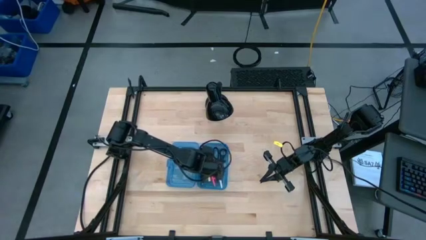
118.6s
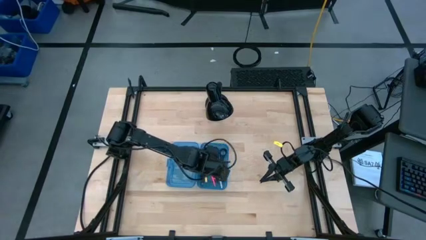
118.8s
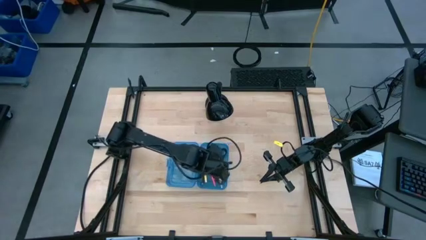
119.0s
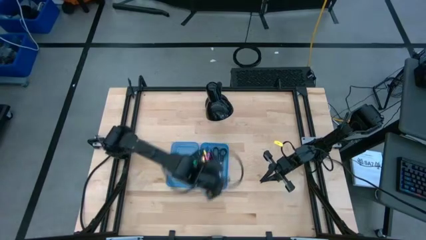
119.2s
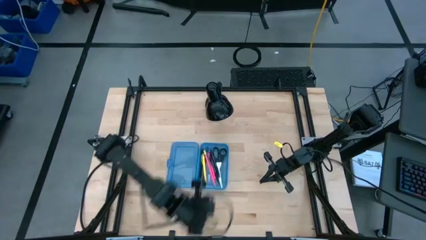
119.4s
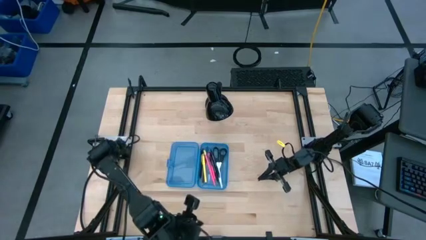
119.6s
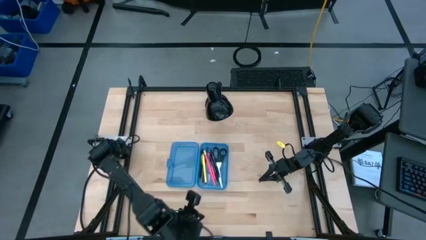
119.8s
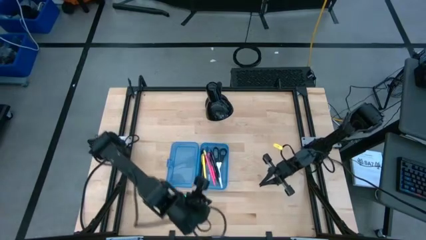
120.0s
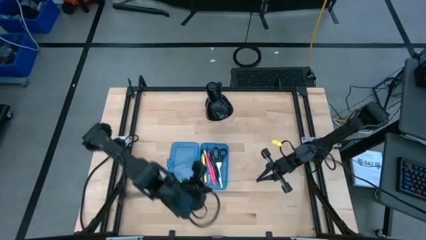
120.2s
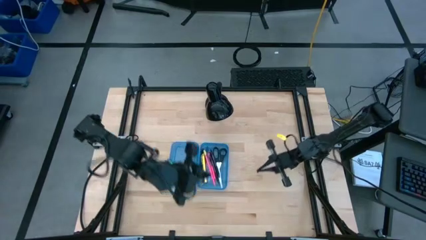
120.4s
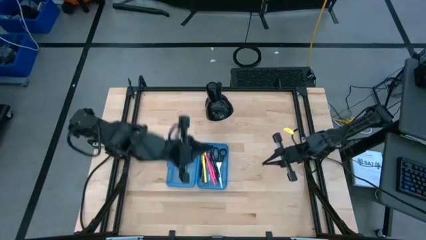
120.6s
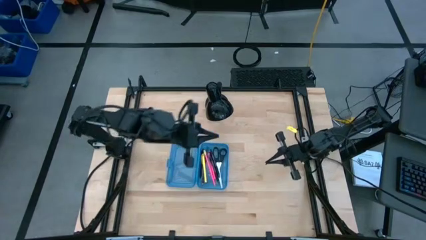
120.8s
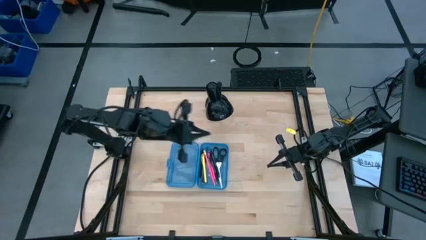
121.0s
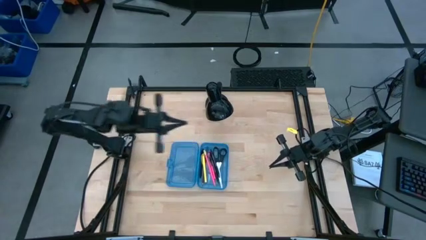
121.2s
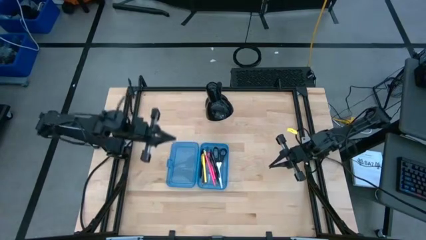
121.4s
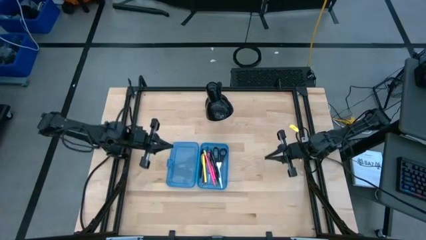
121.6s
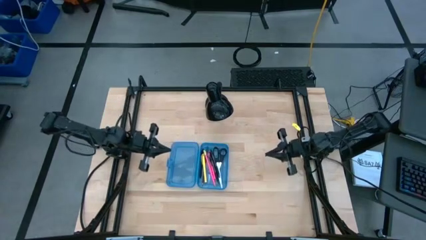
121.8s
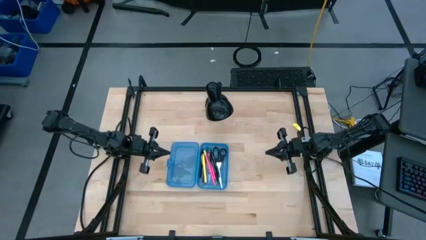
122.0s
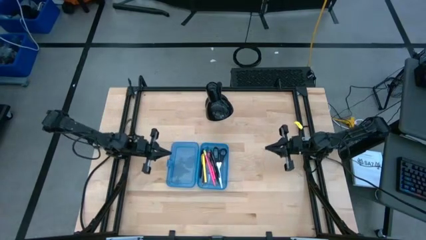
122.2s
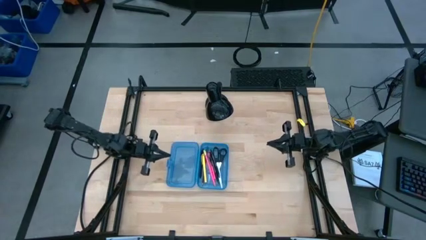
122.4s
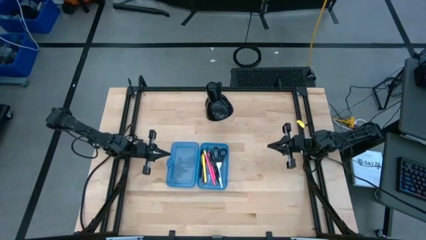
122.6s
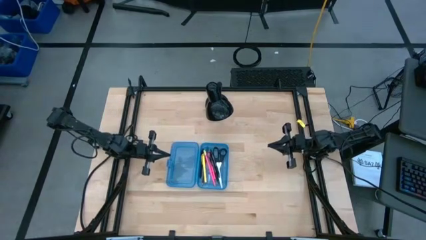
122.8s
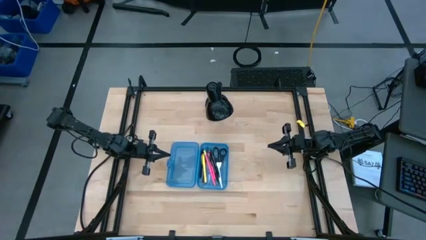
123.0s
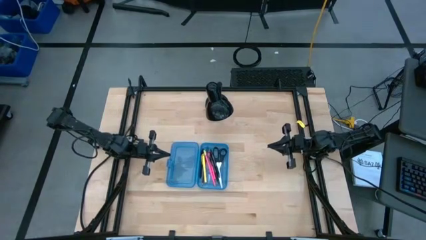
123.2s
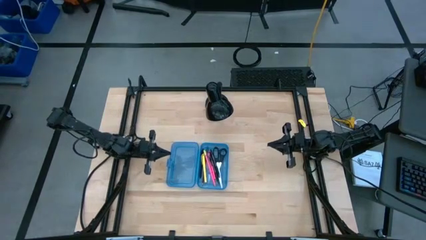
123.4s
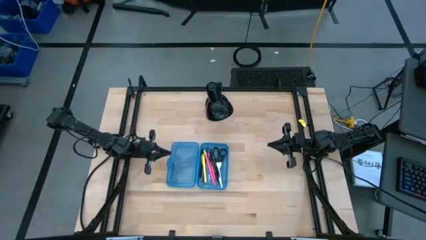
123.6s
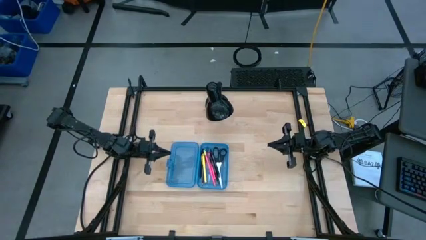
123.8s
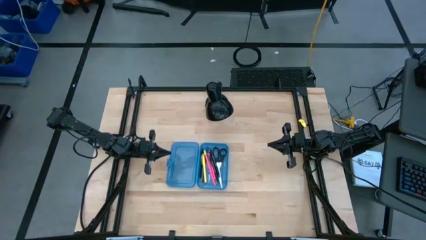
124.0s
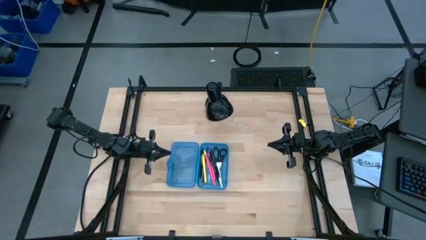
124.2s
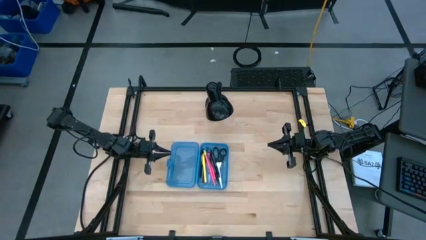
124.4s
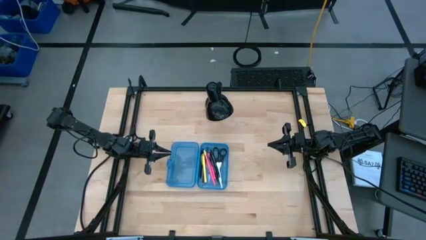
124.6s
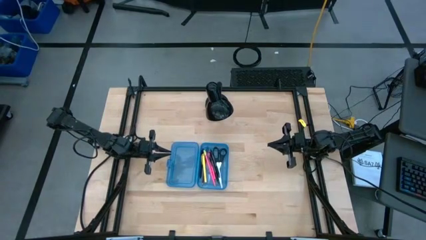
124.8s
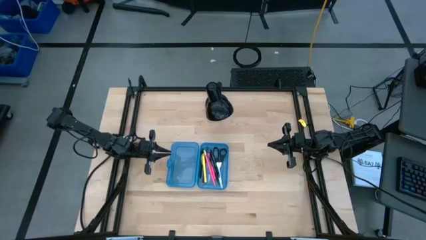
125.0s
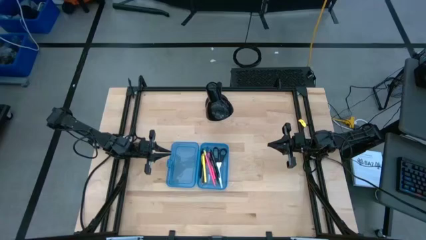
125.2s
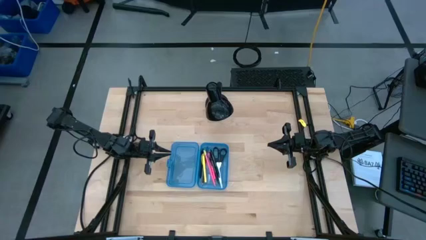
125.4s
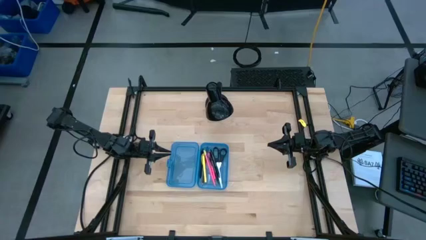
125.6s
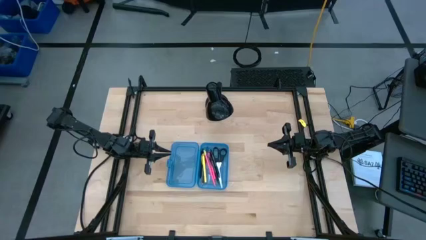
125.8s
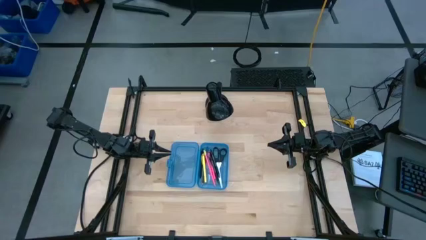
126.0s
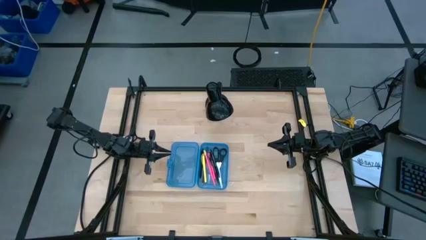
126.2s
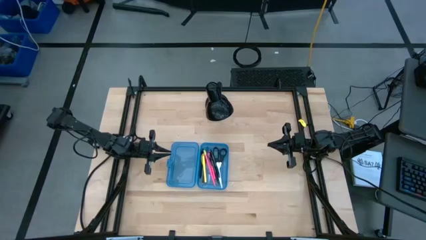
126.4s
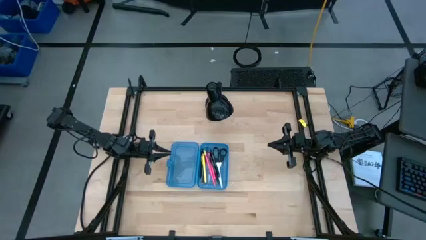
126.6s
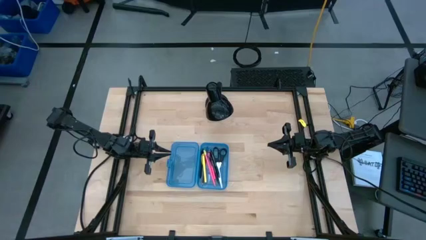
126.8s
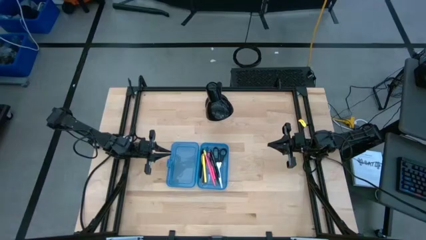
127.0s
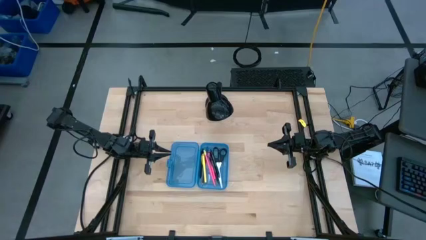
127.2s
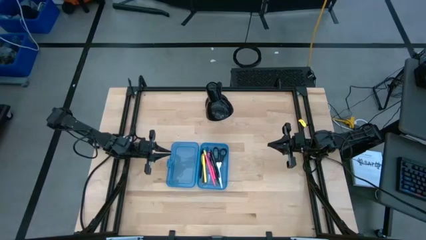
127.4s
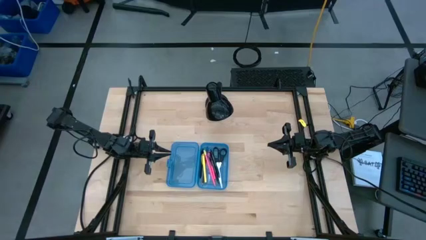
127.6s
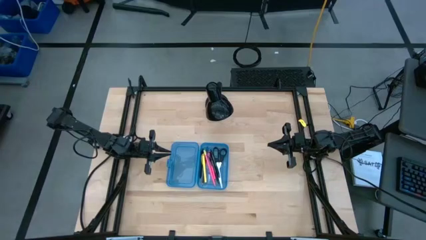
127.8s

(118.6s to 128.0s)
Task: Pick & place school supplies into a supply box
Return to Home Position

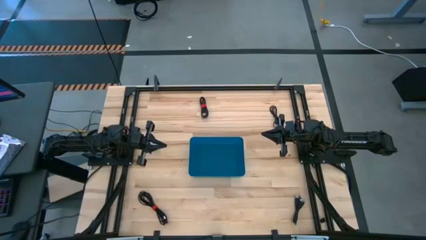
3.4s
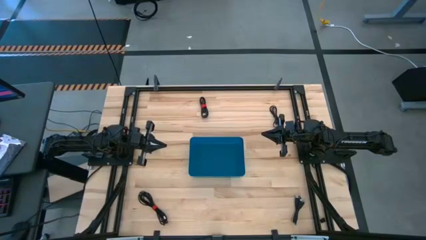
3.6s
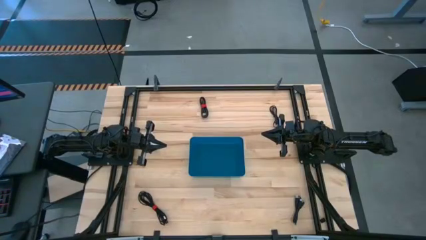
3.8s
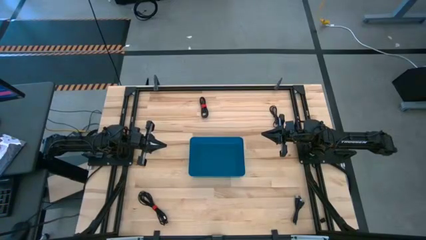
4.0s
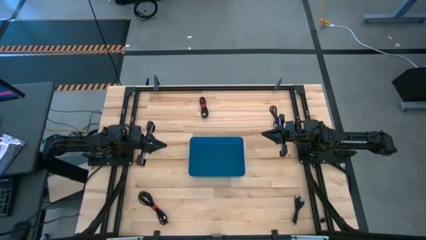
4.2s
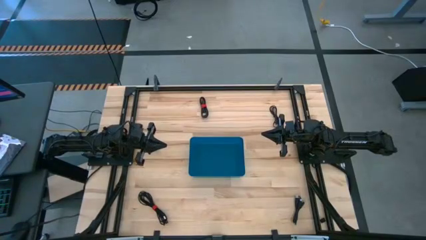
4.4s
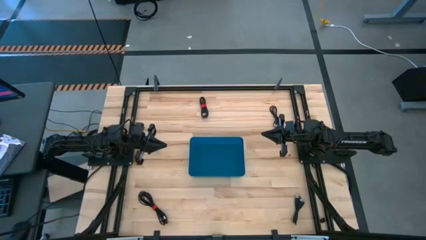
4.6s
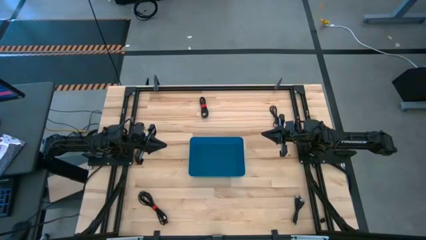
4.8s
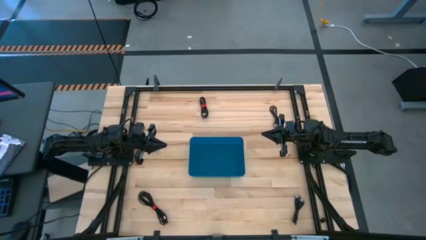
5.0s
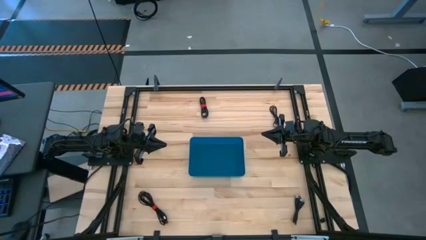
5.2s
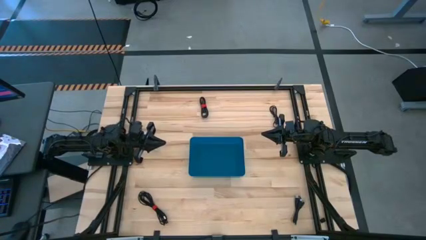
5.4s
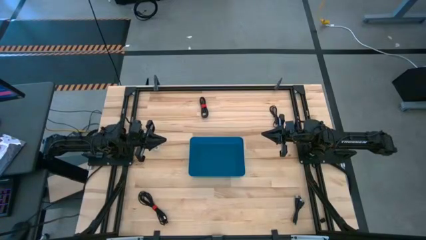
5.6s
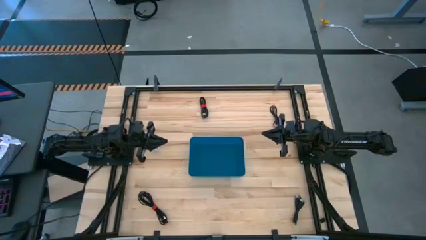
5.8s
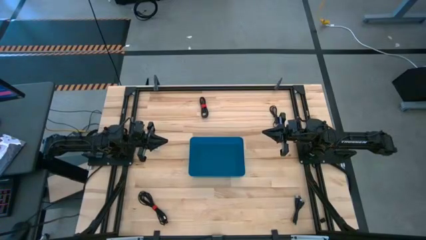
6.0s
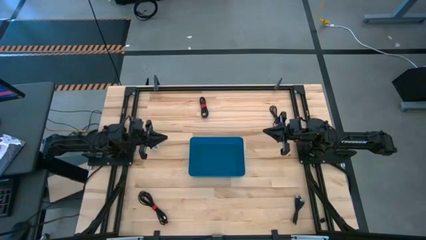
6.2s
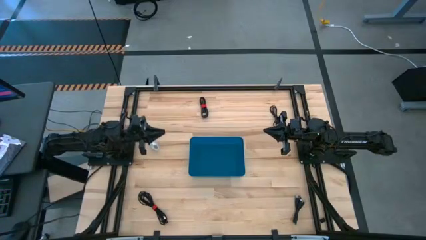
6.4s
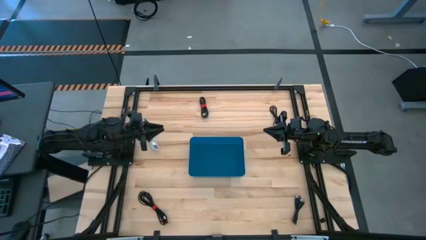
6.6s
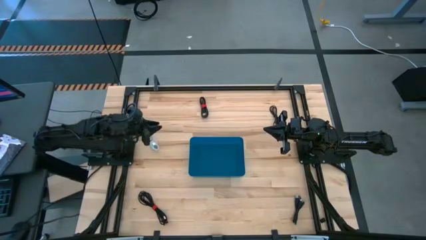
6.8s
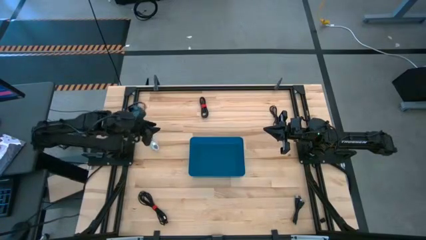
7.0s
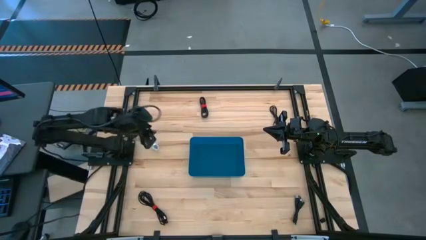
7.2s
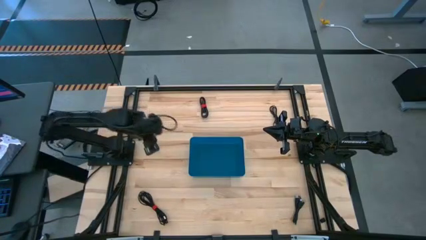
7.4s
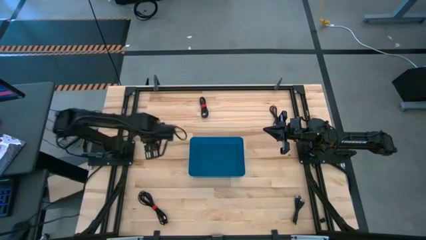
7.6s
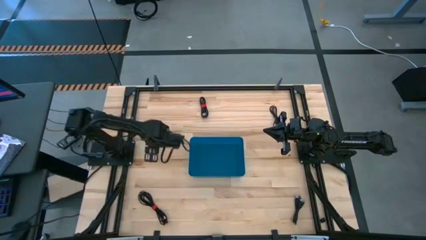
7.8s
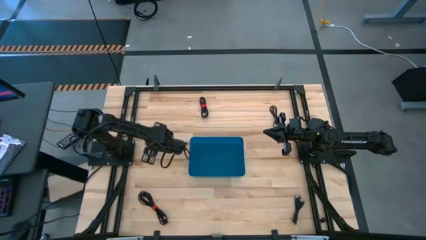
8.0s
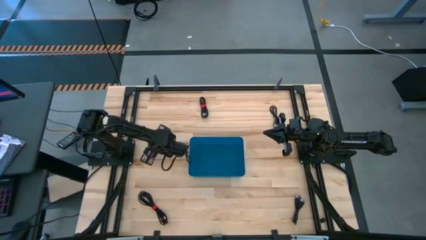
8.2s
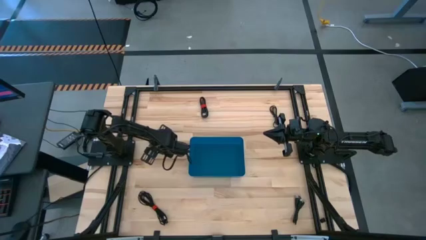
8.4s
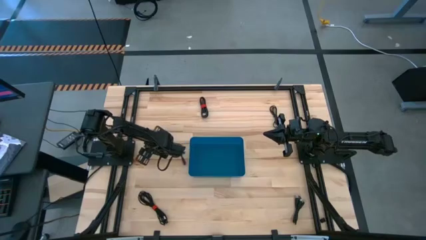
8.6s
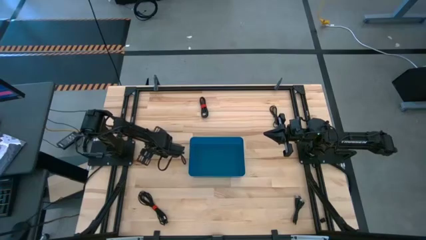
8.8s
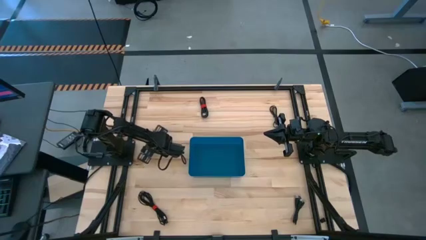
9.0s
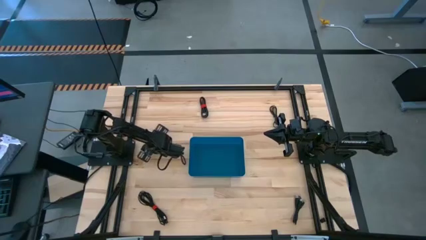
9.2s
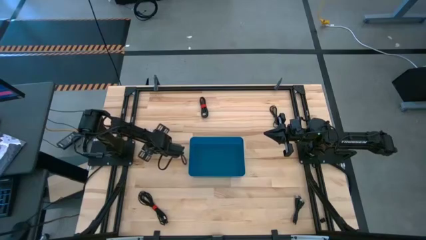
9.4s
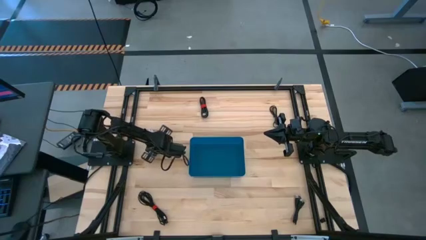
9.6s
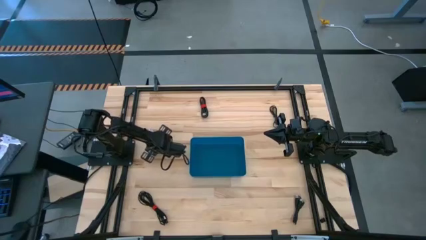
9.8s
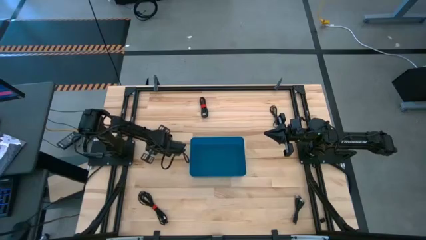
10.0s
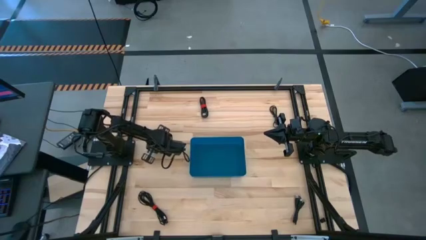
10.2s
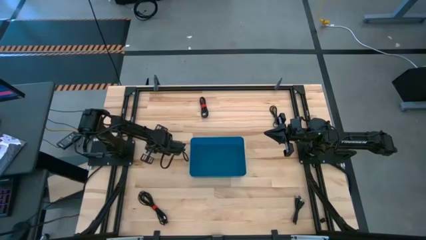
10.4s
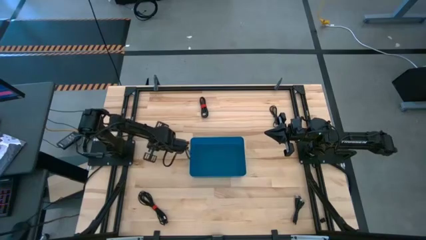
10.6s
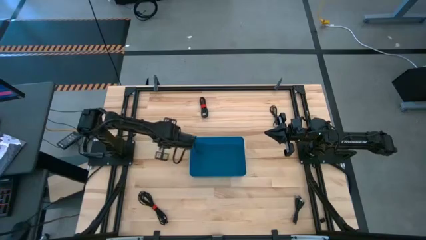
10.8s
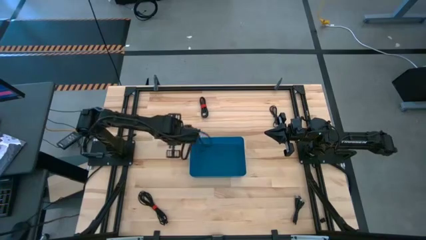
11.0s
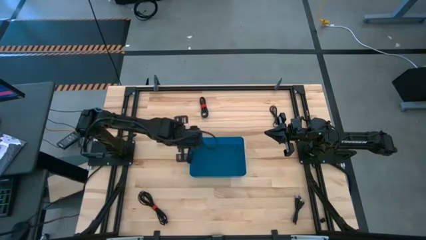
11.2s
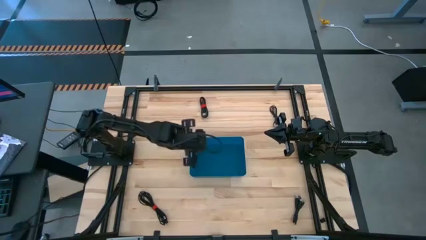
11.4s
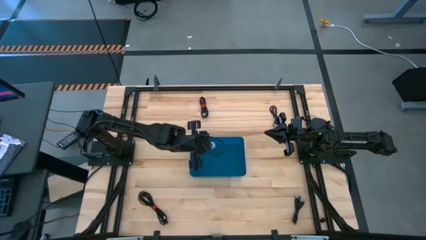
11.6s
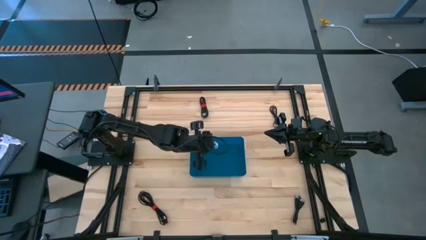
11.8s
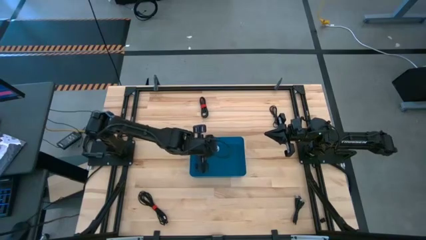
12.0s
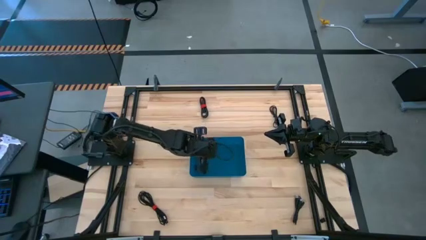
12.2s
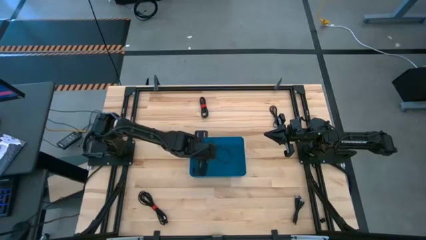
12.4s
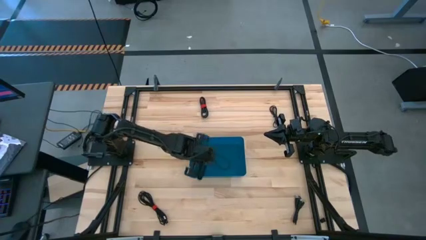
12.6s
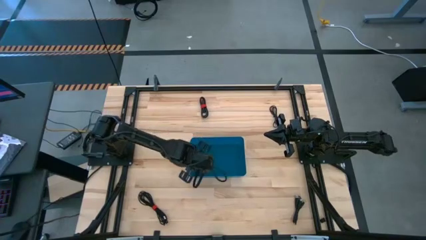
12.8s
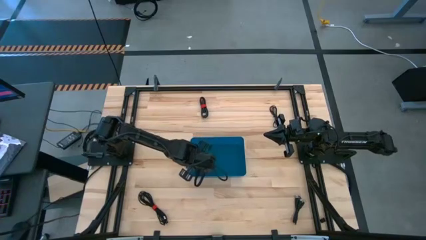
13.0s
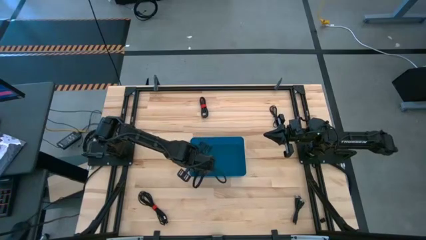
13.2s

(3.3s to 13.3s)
Task: Pick and place USB-C Cables
Put the white charger cable into the blue bin
